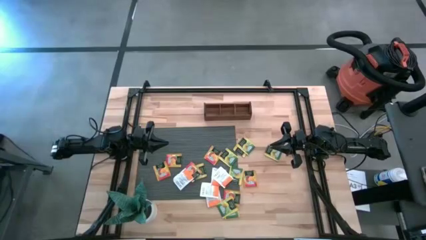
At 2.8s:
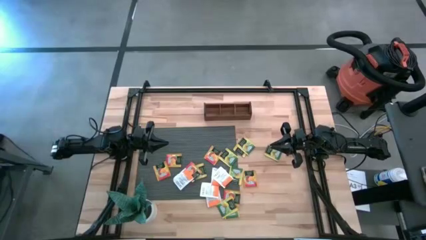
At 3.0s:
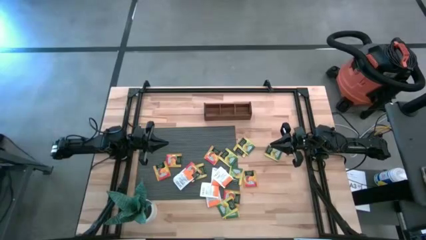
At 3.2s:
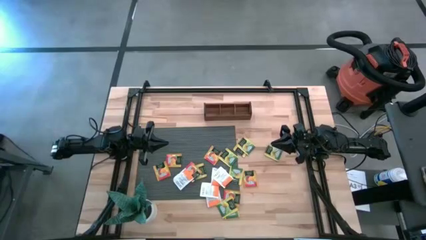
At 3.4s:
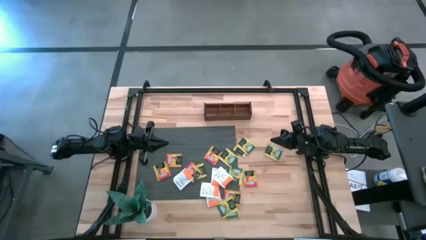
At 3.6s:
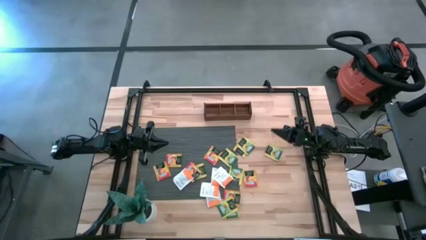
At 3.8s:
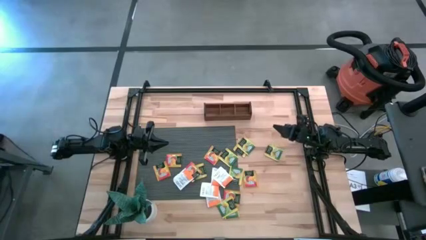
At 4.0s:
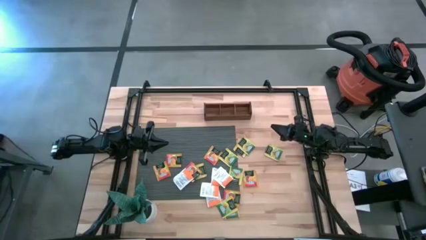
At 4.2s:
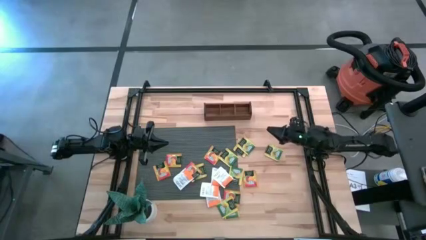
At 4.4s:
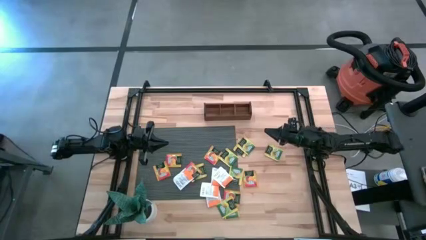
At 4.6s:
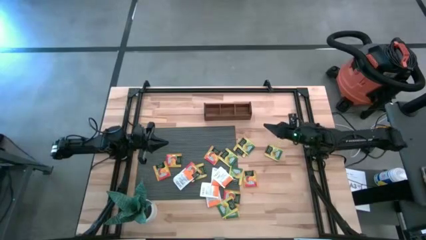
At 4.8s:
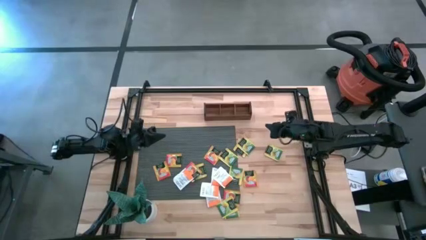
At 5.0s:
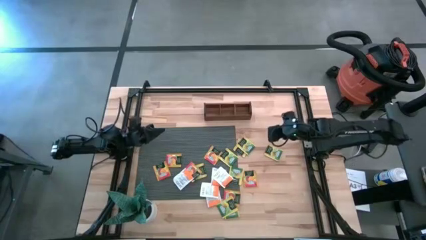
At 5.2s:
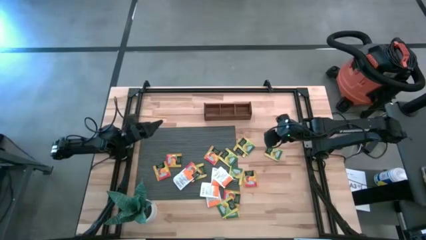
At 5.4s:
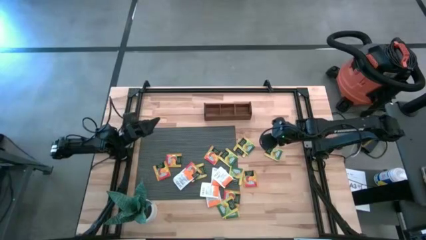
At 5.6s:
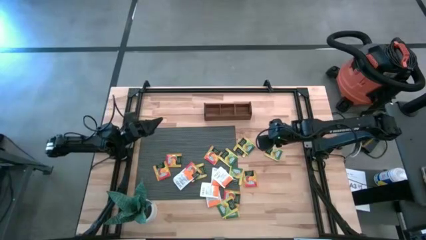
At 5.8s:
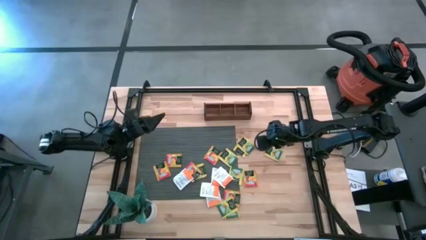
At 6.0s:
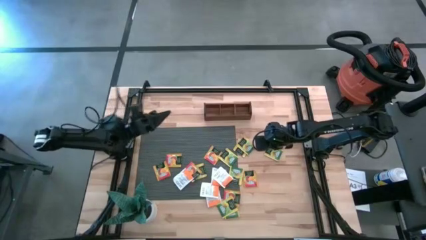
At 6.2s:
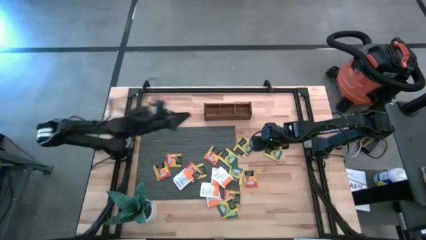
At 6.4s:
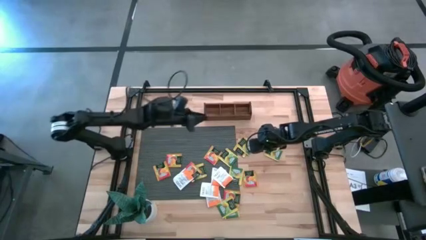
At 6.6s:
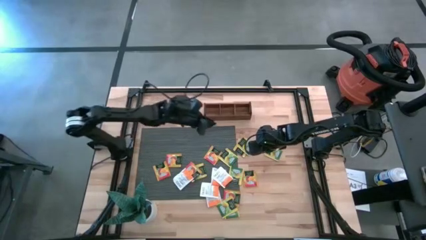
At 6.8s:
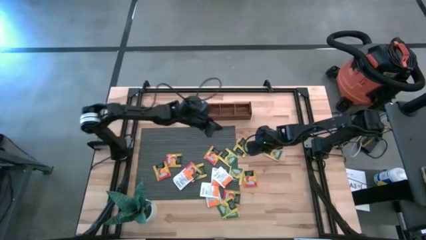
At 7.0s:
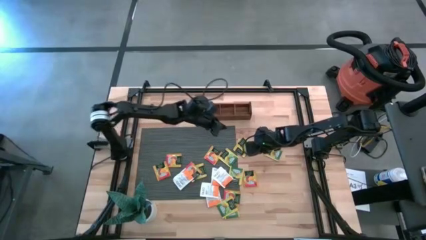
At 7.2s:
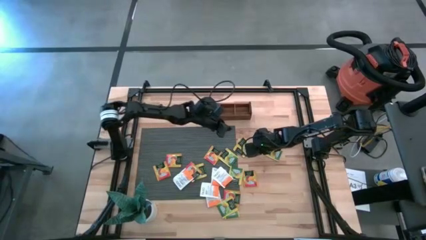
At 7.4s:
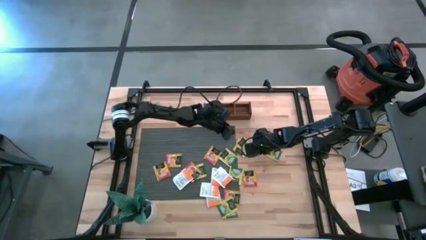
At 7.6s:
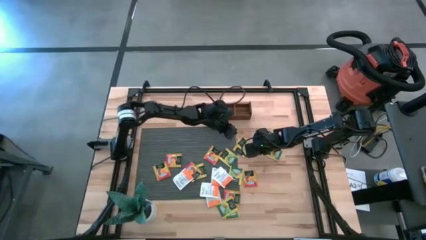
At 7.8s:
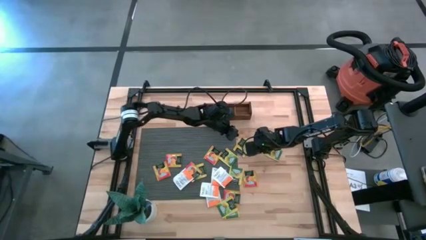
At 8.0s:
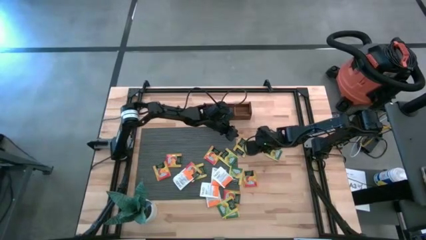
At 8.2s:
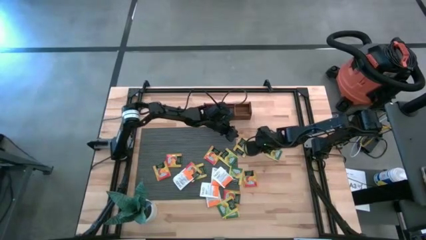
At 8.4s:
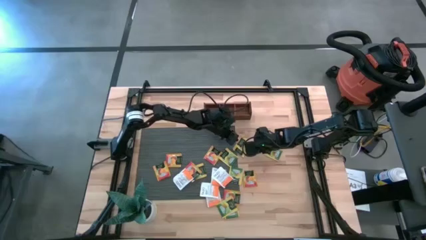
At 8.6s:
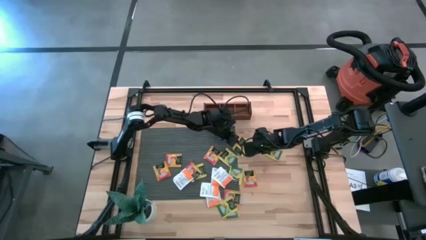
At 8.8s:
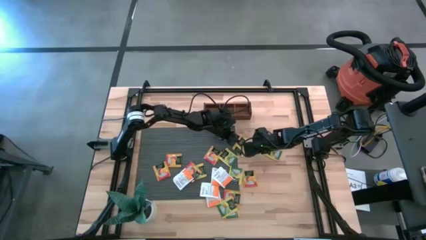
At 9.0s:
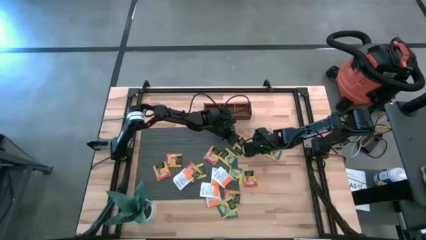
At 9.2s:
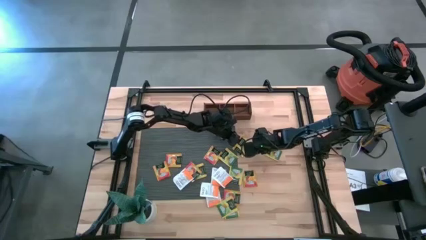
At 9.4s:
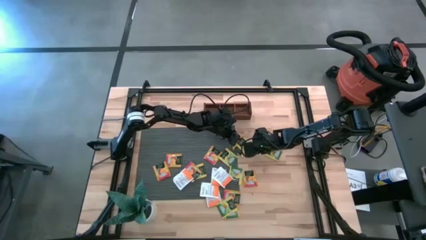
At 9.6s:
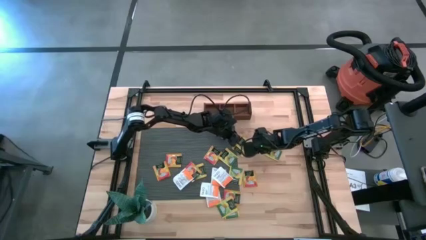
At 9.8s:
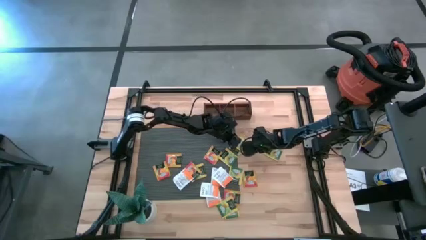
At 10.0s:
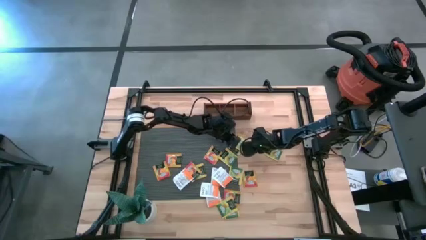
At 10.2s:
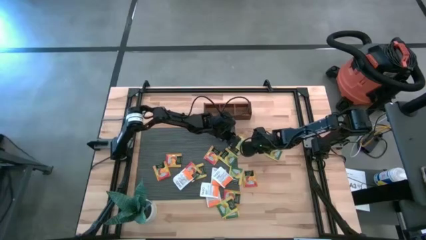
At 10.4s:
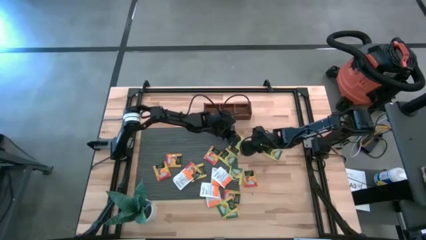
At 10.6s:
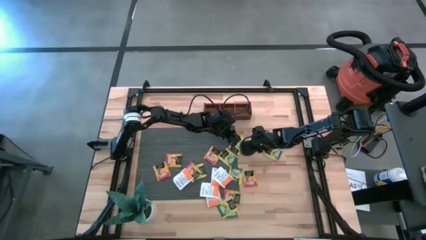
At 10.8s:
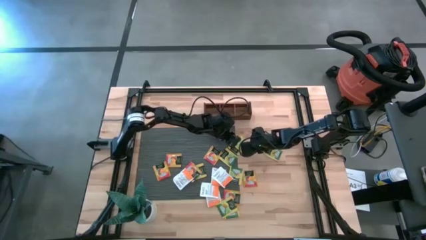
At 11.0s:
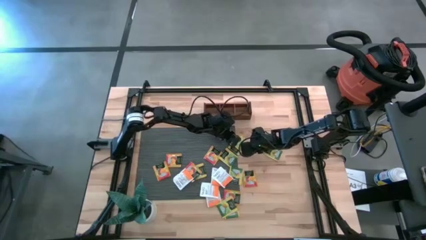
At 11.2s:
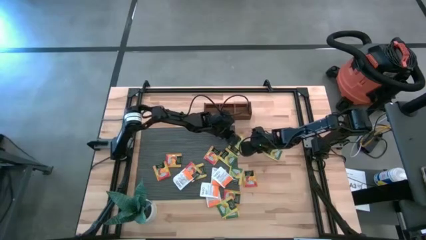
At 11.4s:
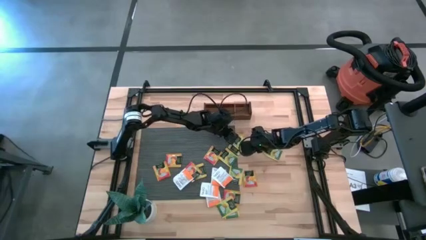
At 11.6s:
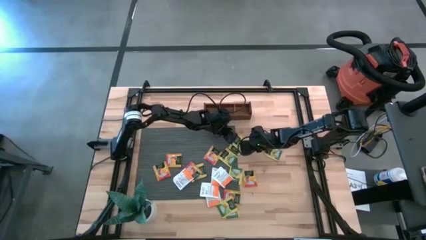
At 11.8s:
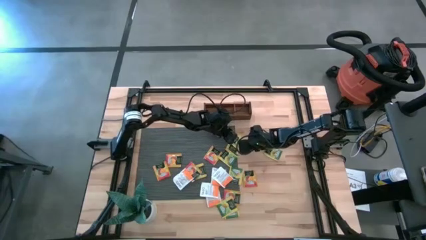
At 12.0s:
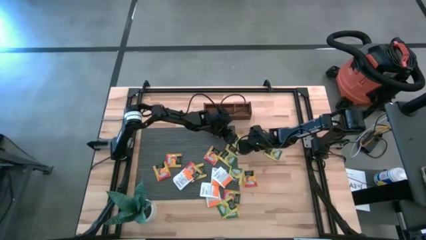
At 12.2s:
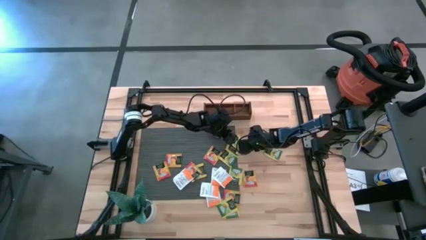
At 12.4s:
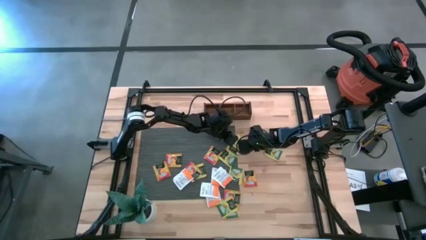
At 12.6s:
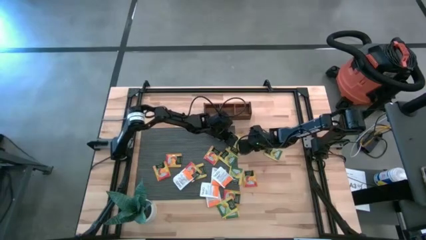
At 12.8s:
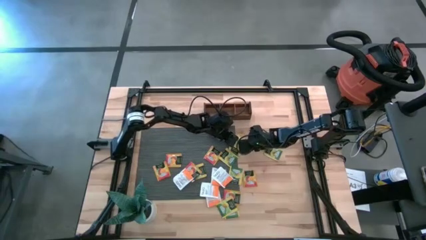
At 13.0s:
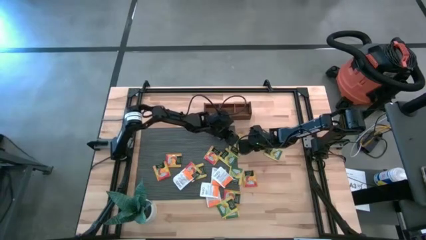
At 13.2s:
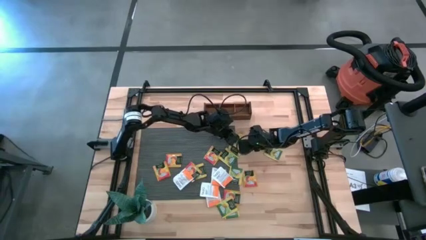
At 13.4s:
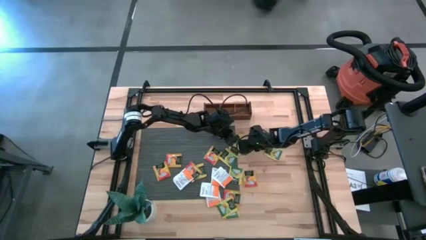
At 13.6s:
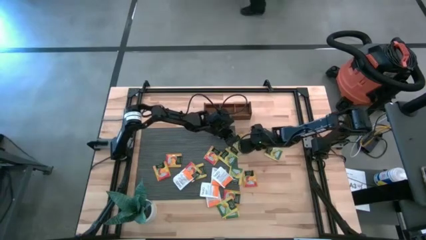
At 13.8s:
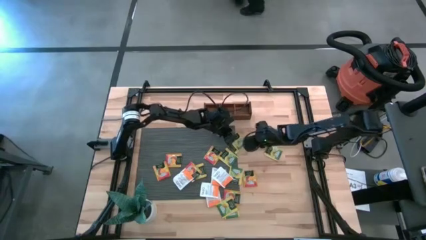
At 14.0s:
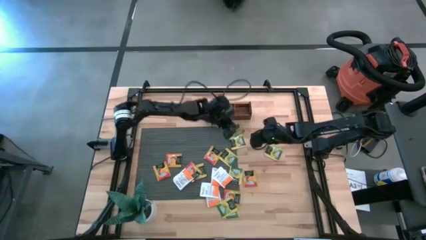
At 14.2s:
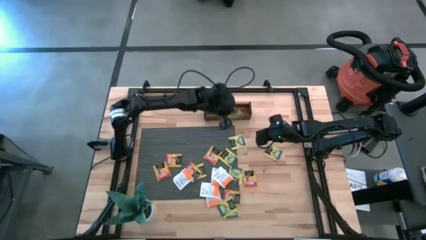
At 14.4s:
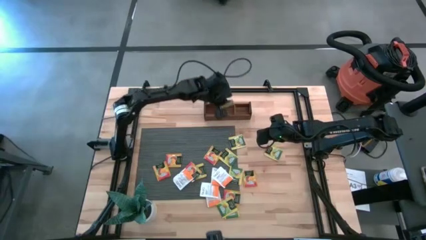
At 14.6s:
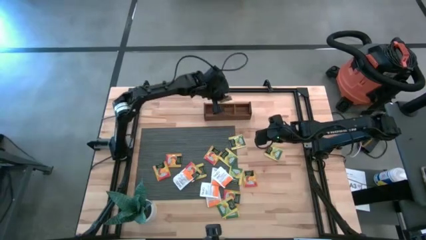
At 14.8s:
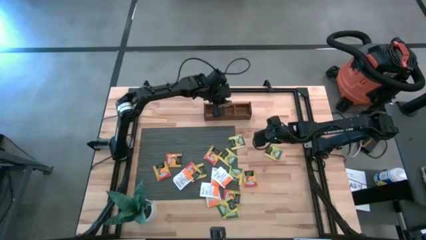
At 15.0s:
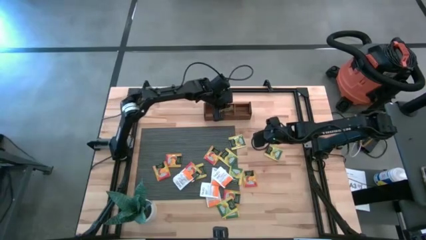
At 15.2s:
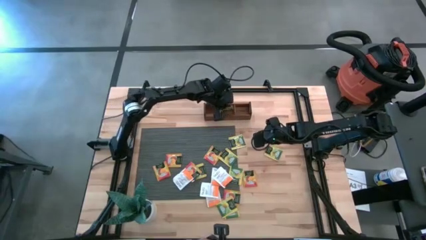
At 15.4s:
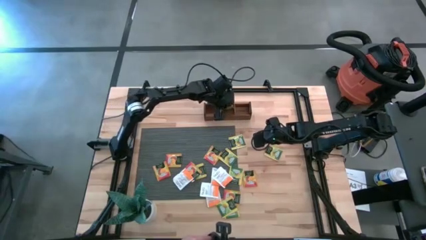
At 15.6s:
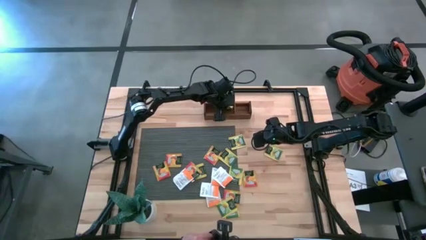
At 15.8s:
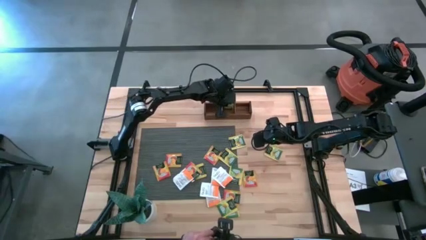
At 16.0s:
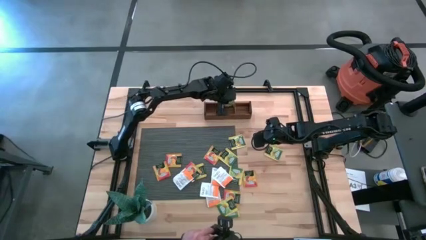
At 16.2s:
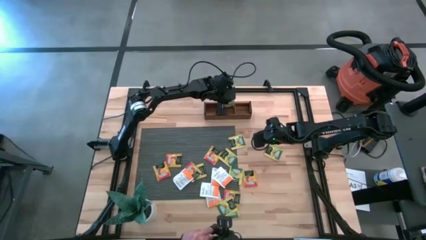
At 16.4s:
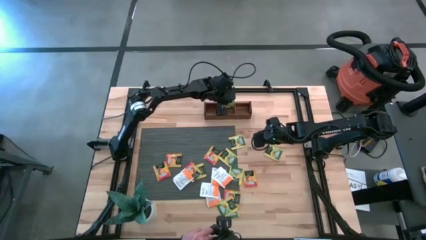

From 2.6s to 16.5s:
Task: Pick & Place Tea
Put the yellow tea bag into the middle section of the wooden organizer
